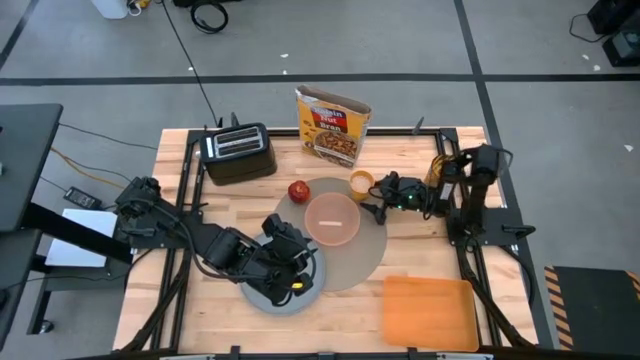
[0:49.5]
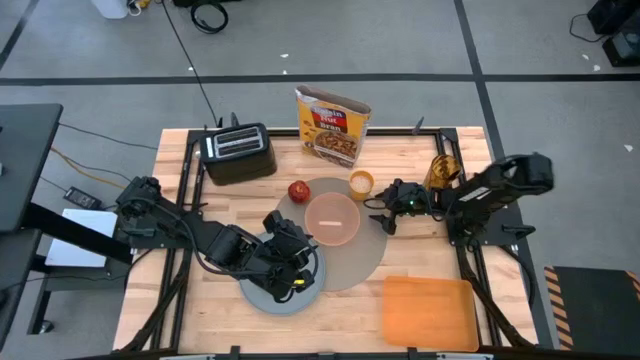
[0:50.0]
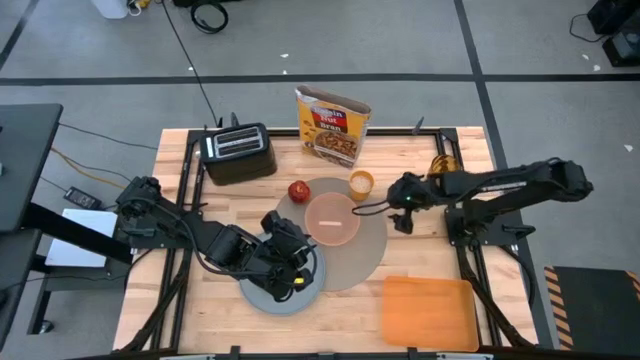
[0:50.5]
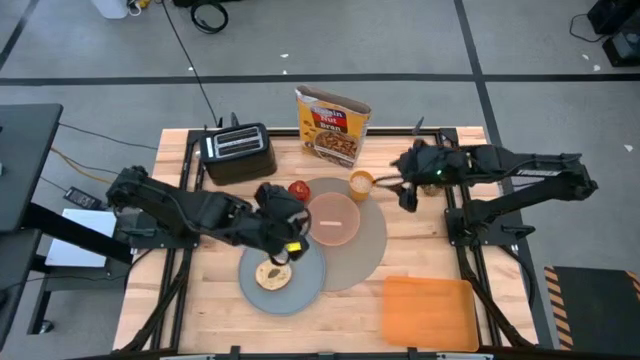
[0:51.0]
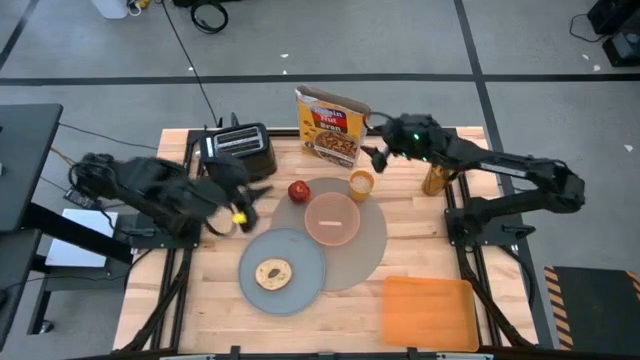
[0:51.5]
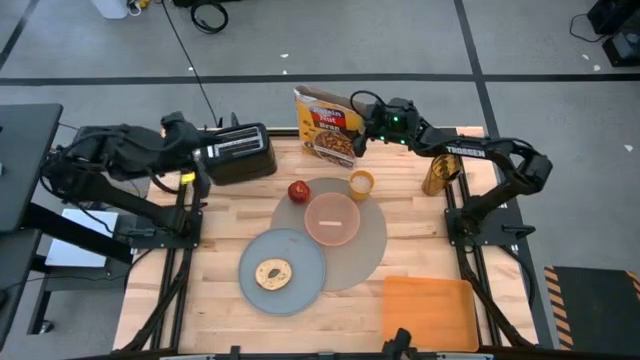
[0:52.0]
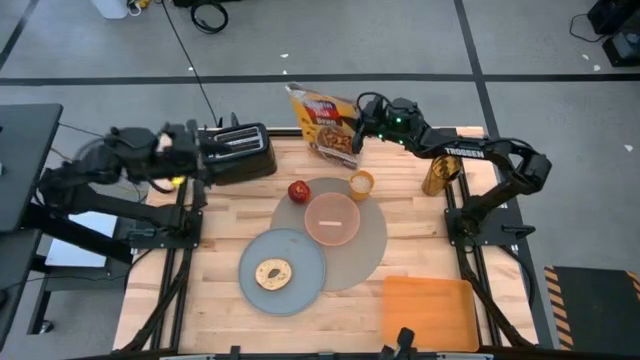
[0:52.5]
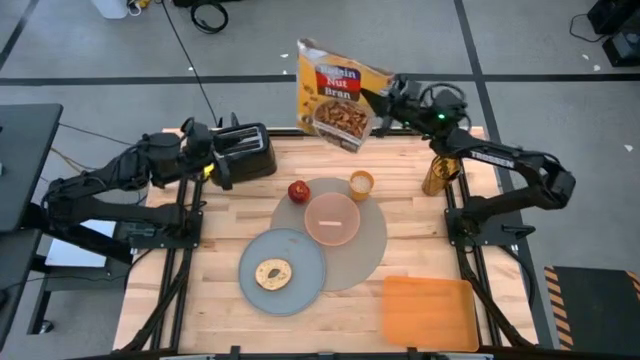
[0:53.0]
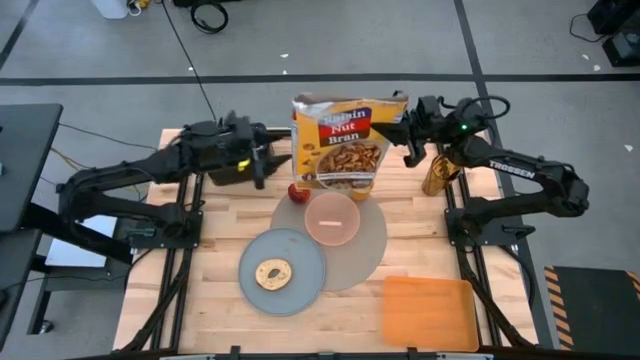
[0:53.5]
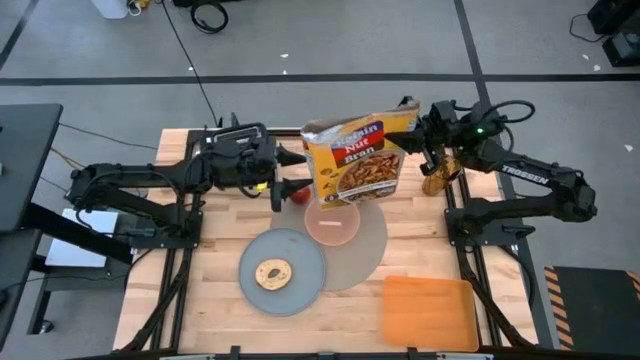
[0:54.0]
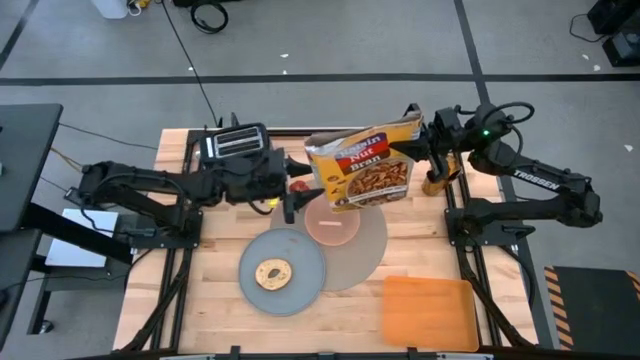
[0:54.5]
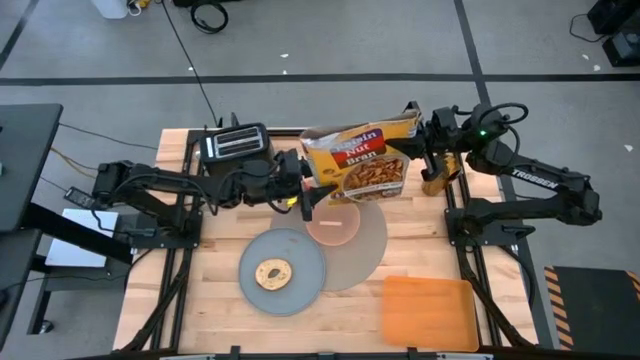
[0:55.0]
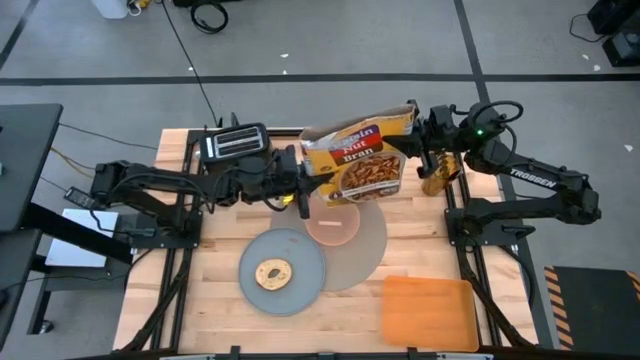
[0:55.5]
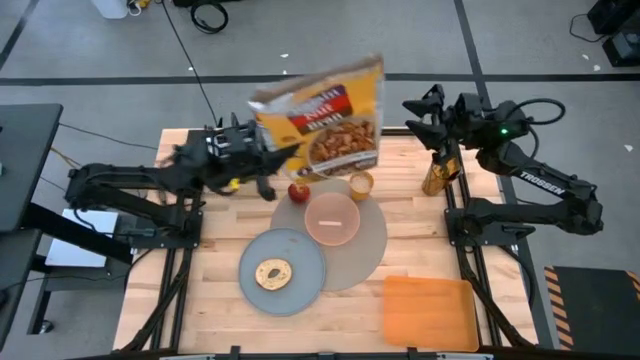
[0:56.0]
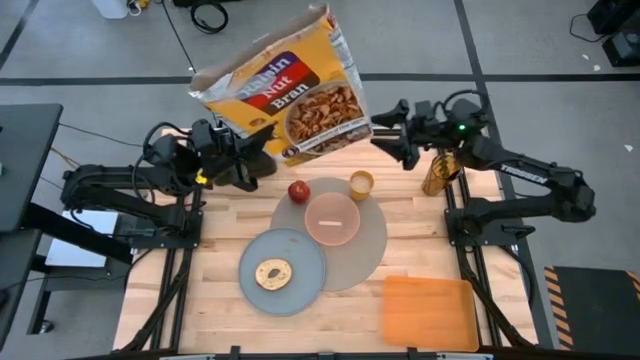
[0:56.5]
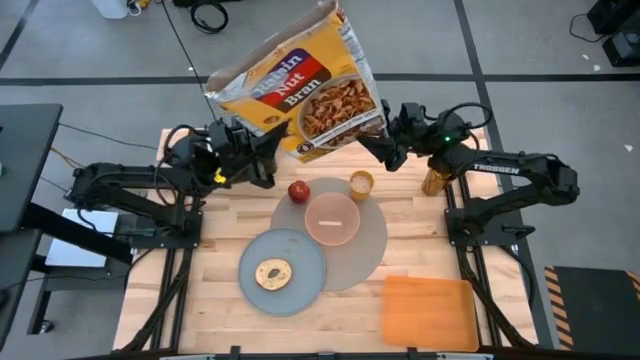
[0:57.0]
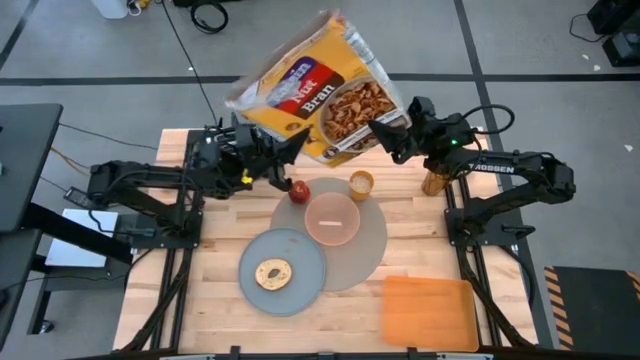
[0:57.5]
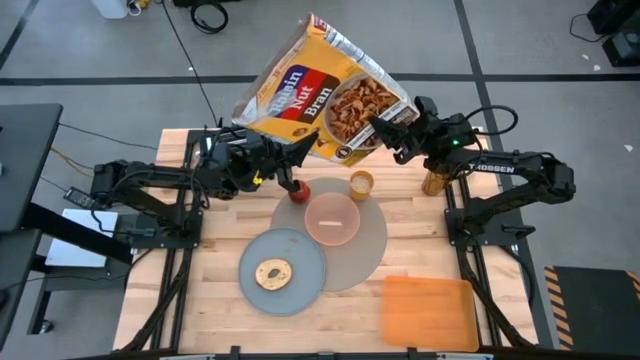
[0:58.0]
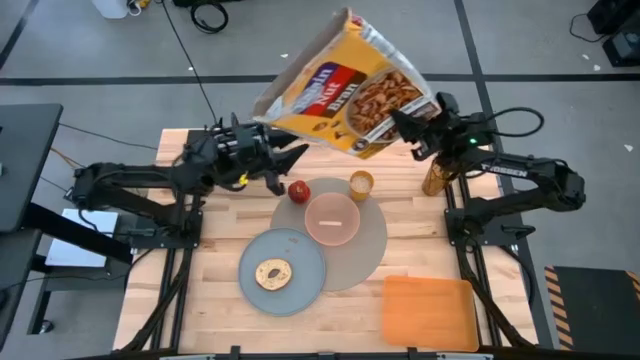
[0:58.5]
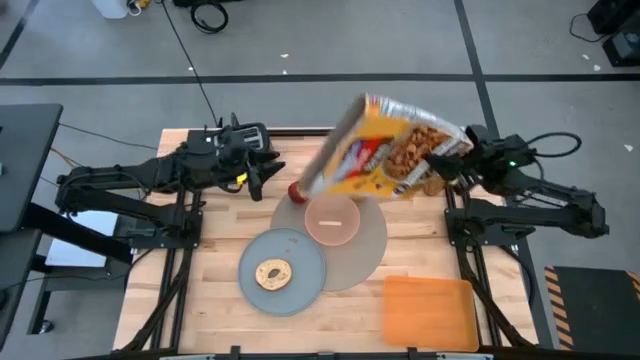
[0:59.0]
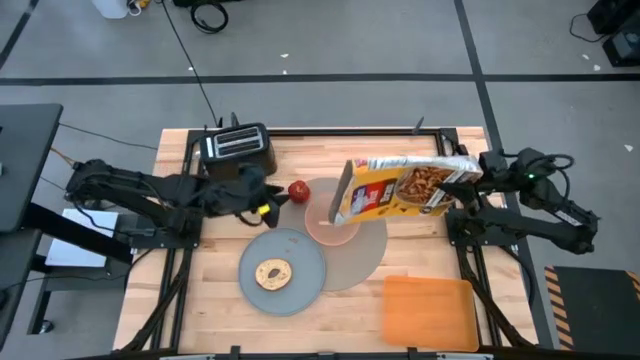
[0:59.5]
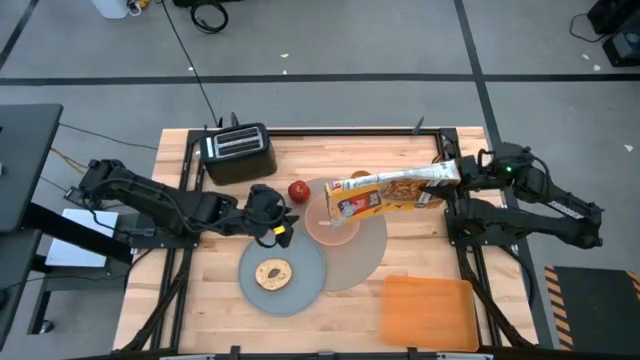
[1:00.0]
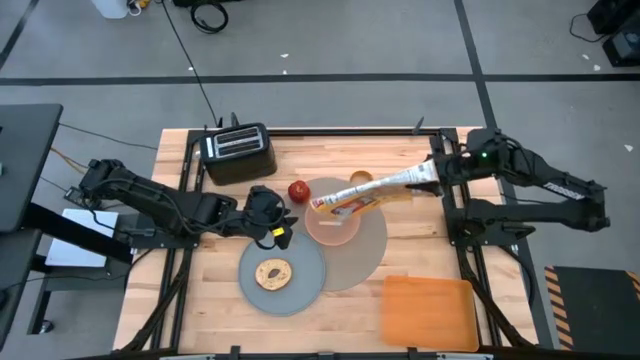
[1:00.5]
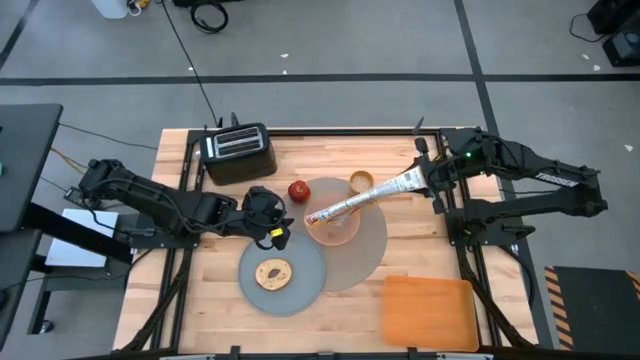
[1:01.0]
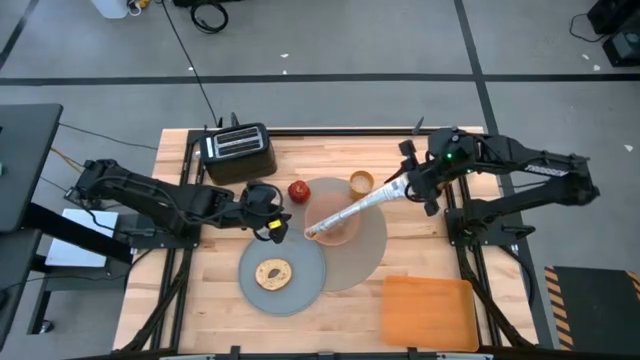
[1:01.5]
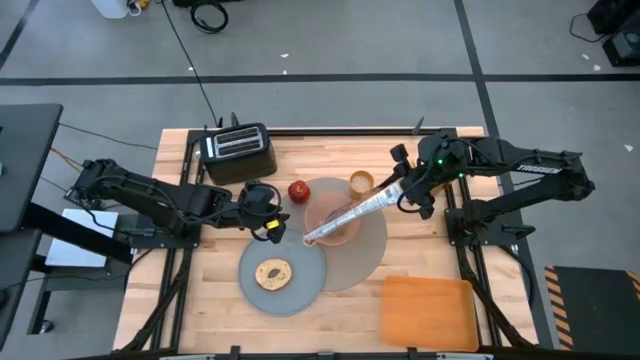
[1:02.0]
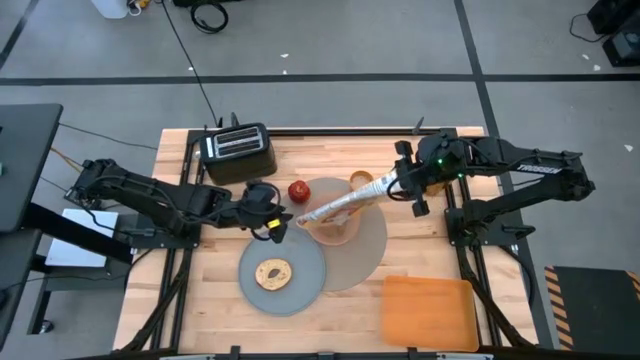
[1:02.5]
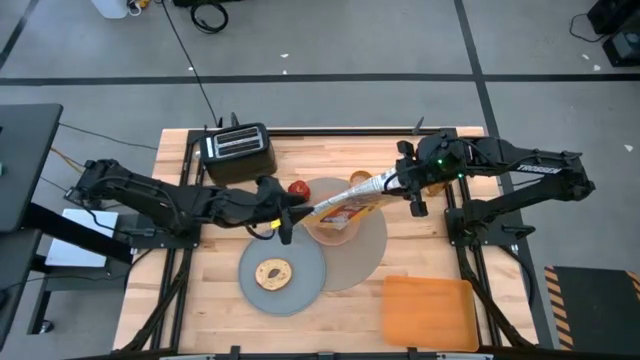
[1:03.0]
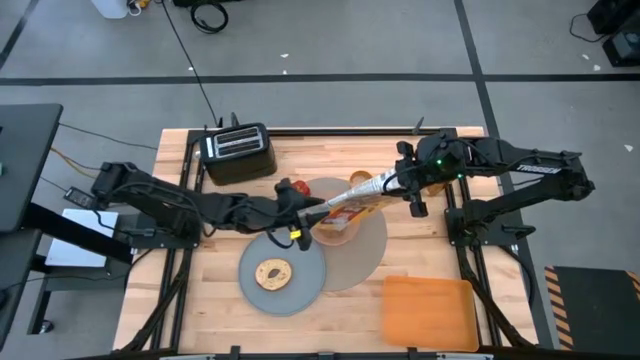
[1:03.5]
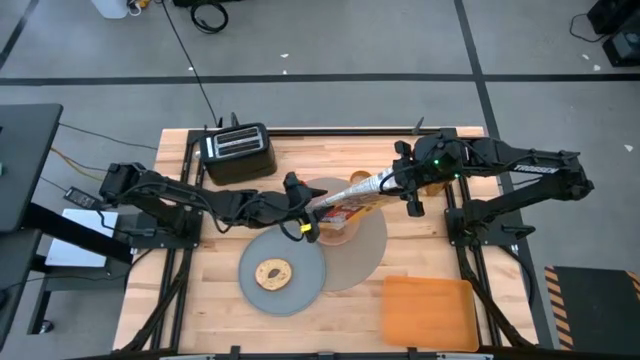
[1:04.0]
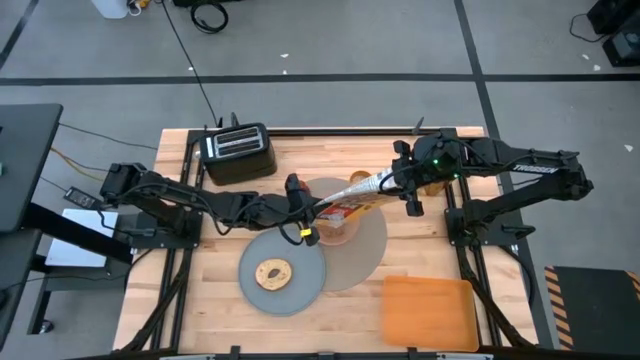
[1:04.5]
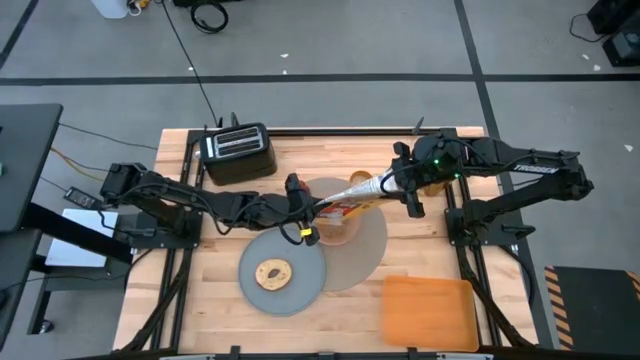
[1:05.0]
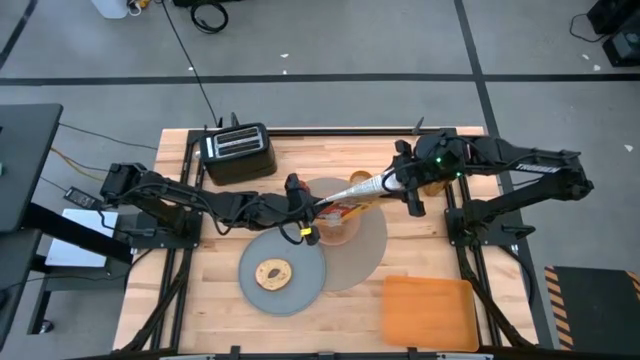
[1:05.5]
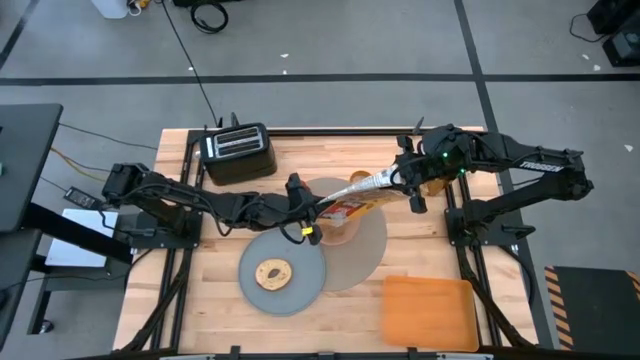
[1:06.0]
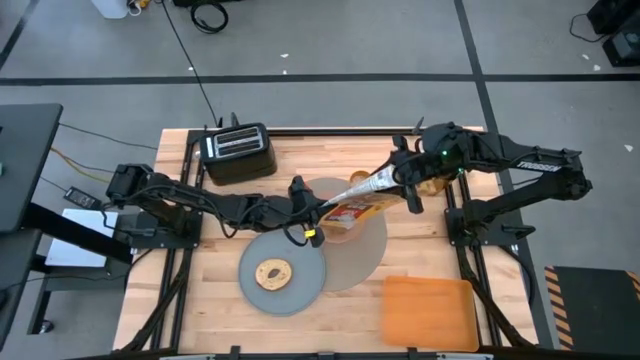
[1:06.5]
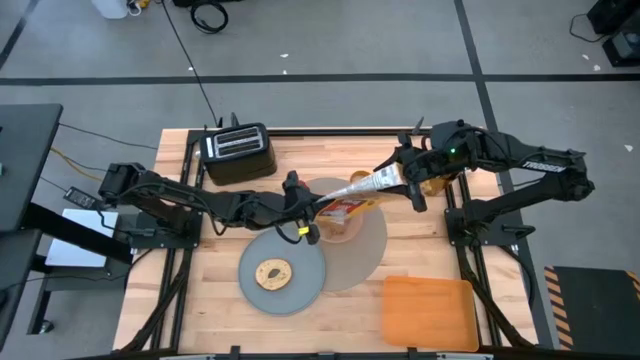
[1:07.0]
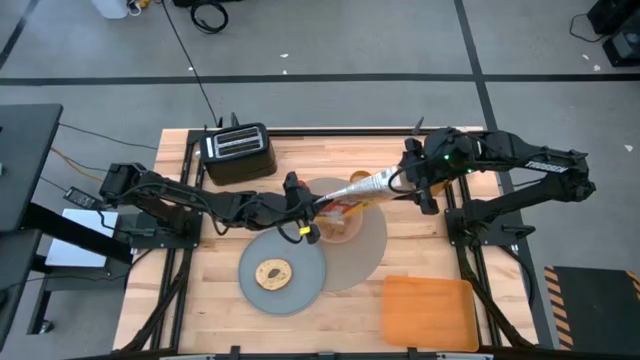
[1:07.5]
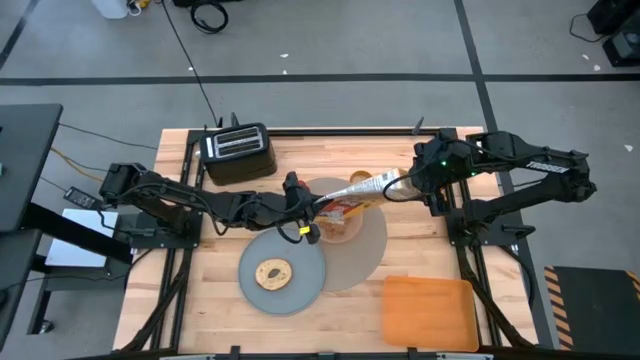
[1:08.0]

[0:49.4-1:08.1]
Task: Arrange a breakfast setting
Pour the cereal from the yellow cereal box into the orange bowl

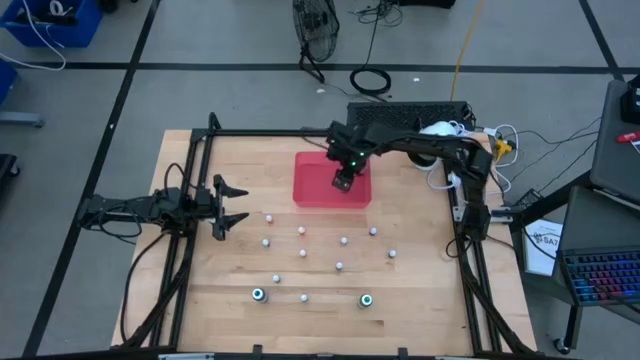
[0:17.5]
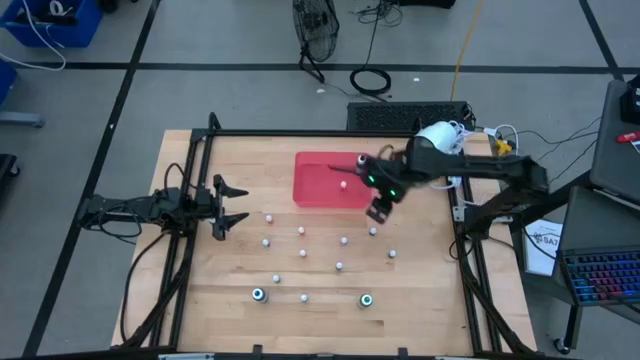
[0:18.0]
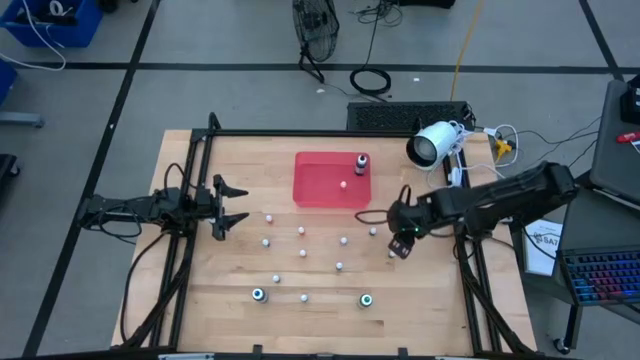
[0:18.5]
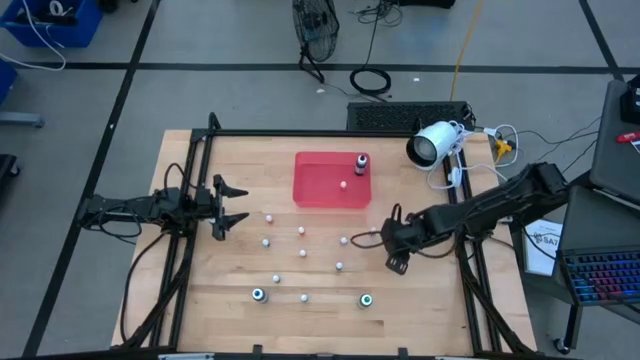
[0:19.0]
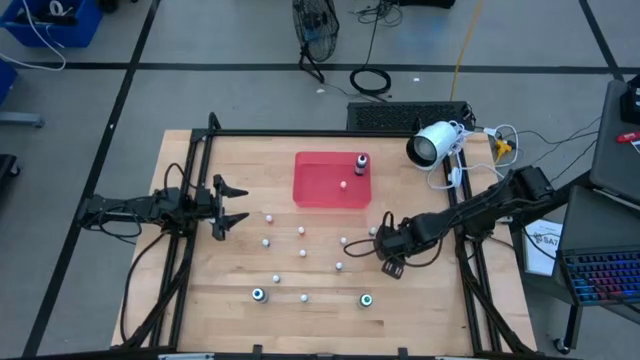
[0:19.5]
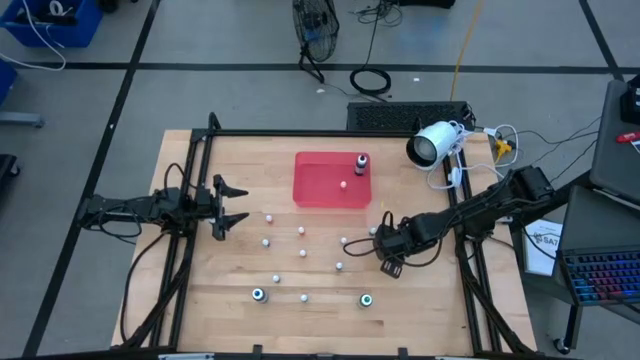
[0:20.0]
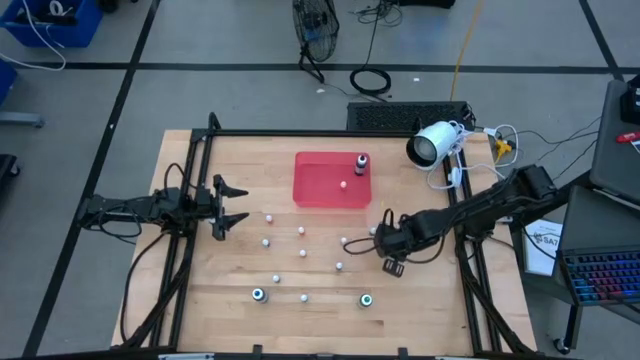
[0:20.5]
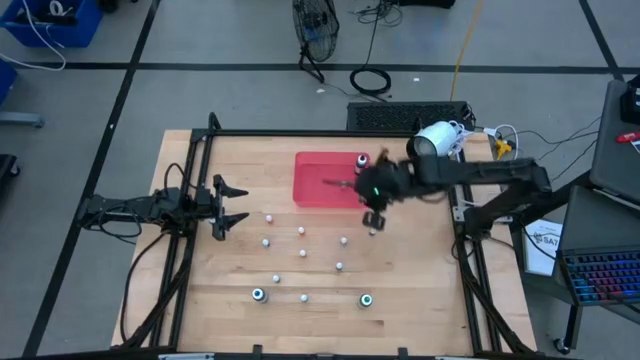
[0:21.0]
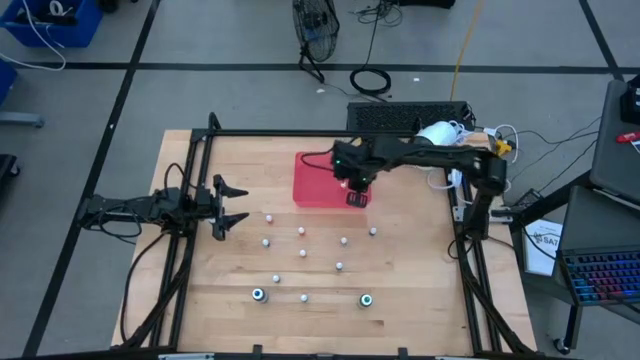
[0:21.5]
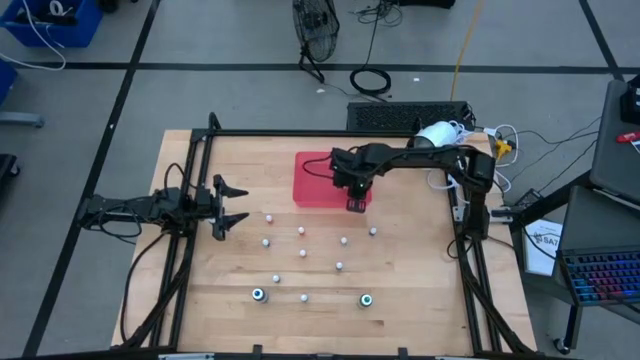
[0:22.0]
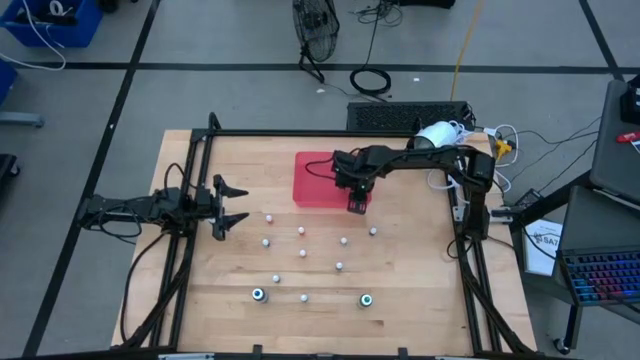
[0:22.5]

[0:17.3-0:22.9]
Task: Pick & Place food coloring
Put the bottom small black food coloring bottle into the bin
